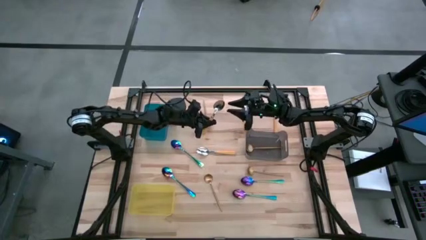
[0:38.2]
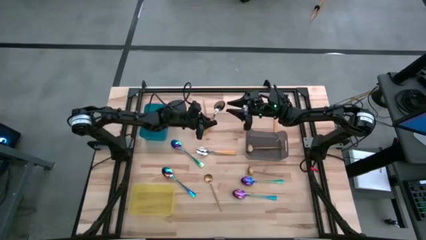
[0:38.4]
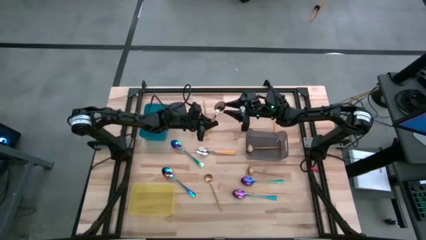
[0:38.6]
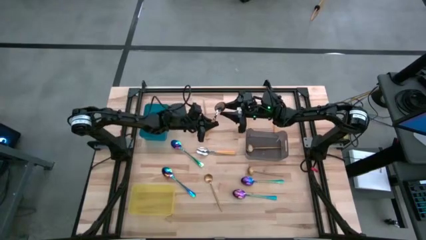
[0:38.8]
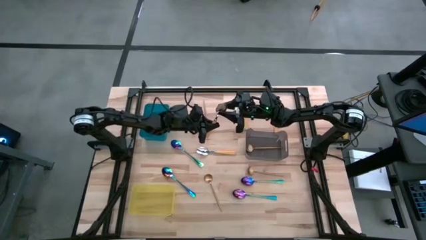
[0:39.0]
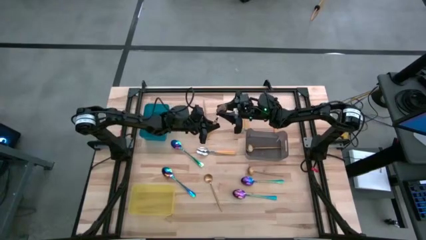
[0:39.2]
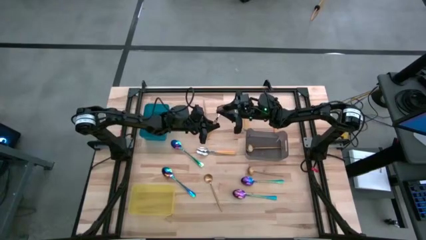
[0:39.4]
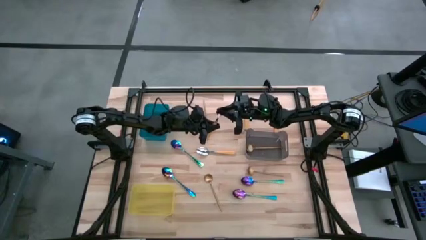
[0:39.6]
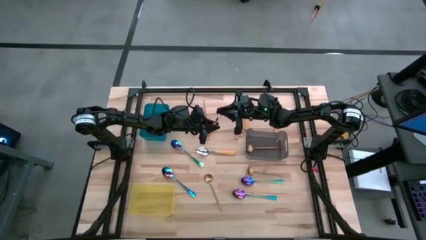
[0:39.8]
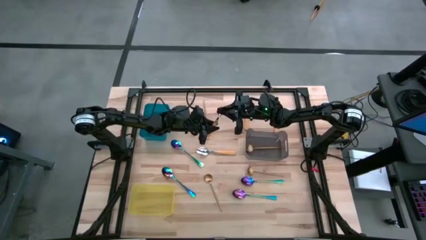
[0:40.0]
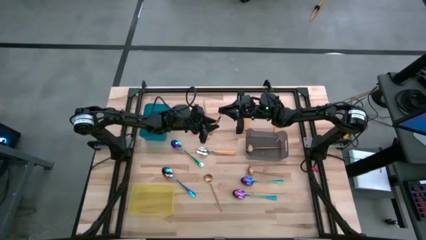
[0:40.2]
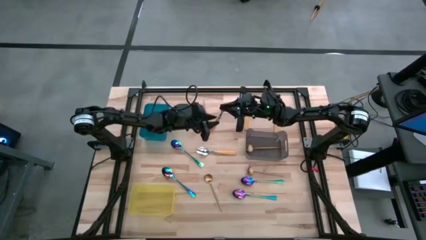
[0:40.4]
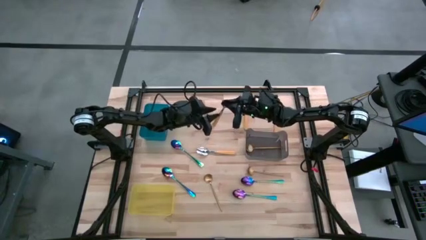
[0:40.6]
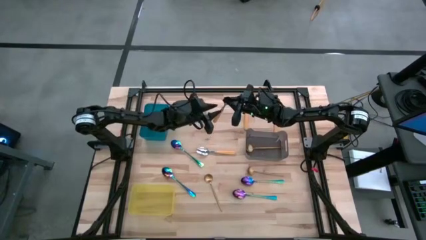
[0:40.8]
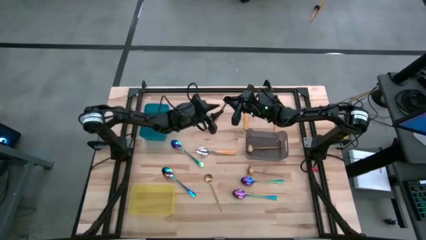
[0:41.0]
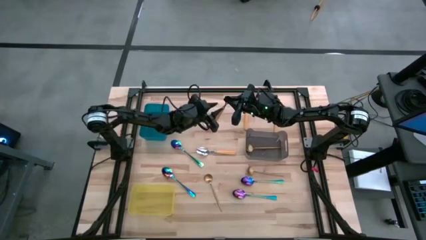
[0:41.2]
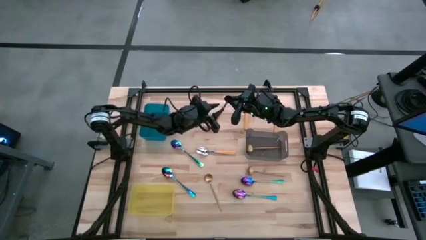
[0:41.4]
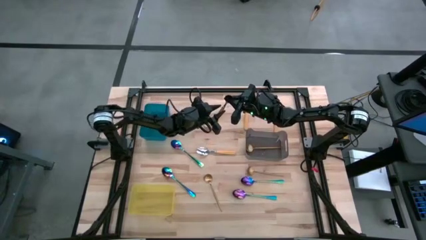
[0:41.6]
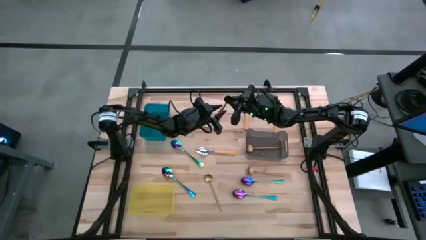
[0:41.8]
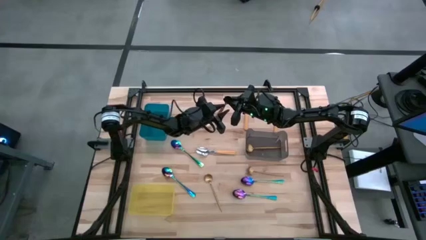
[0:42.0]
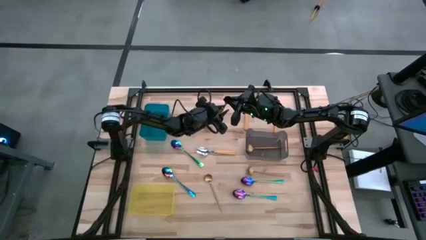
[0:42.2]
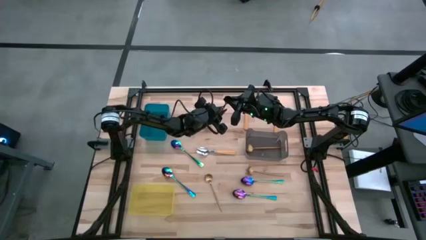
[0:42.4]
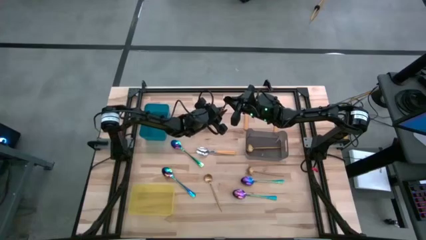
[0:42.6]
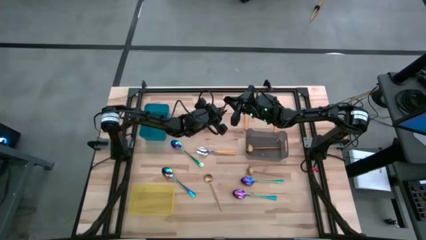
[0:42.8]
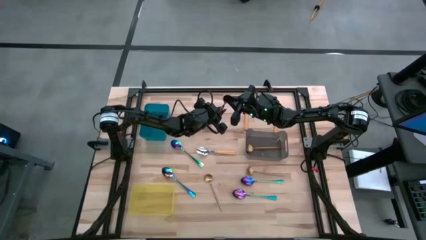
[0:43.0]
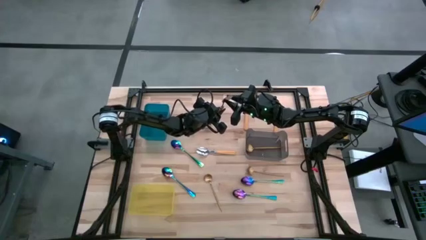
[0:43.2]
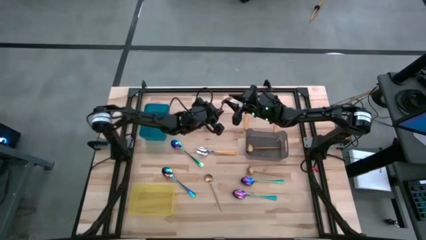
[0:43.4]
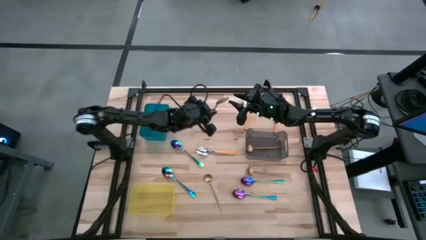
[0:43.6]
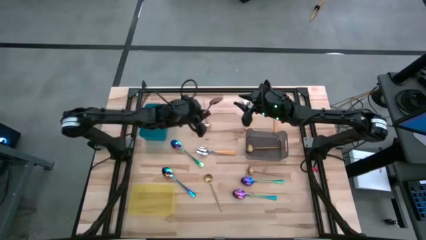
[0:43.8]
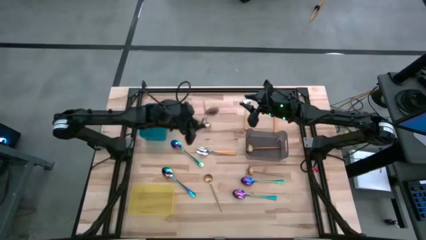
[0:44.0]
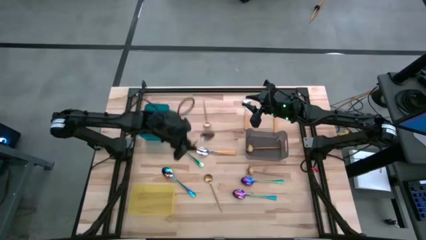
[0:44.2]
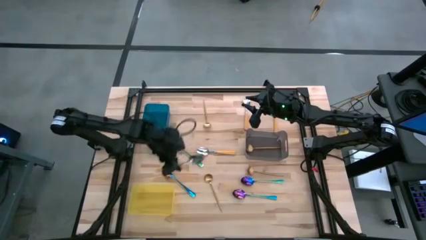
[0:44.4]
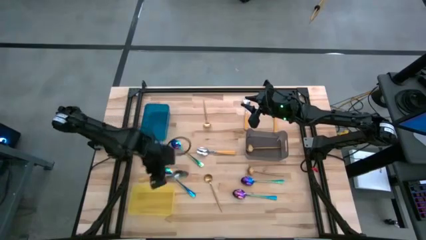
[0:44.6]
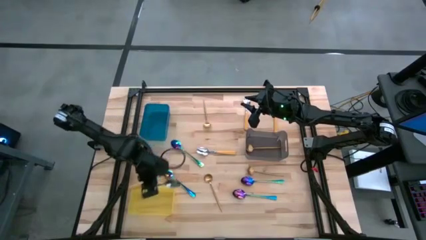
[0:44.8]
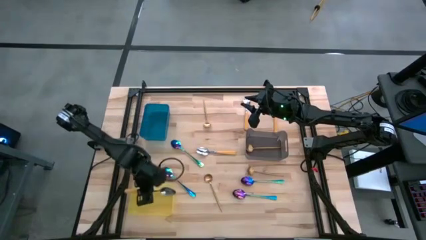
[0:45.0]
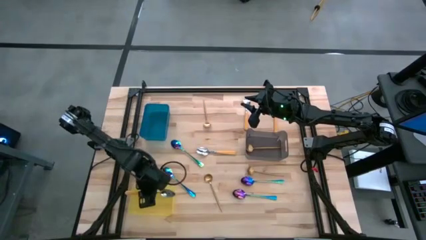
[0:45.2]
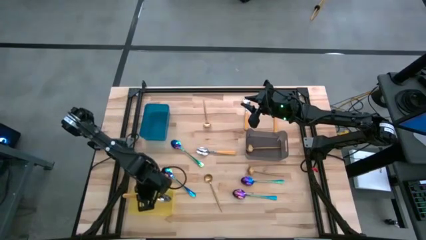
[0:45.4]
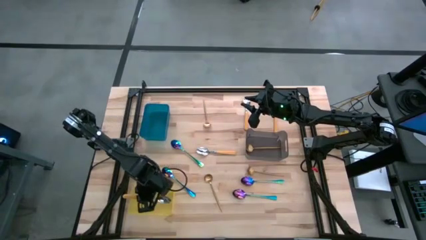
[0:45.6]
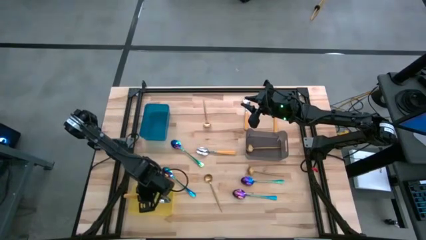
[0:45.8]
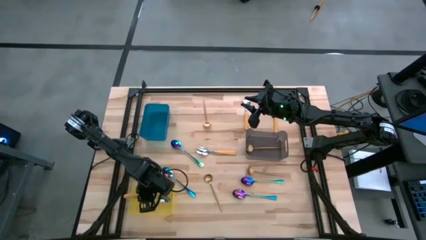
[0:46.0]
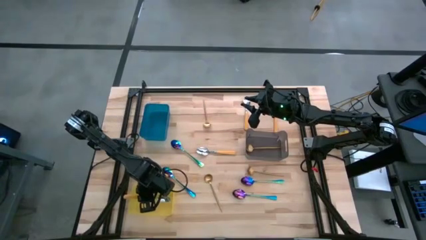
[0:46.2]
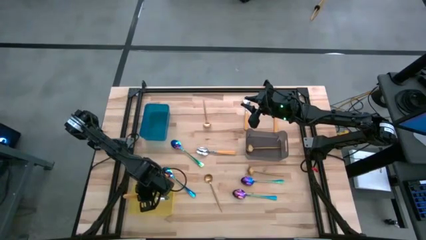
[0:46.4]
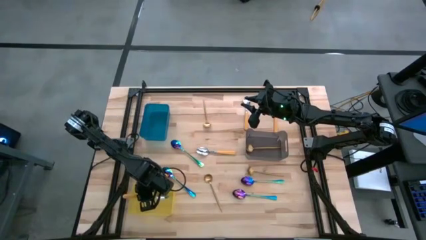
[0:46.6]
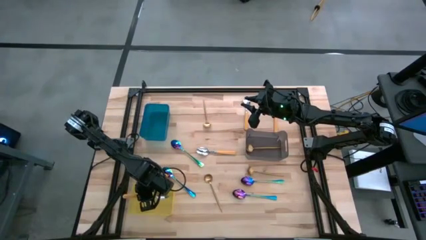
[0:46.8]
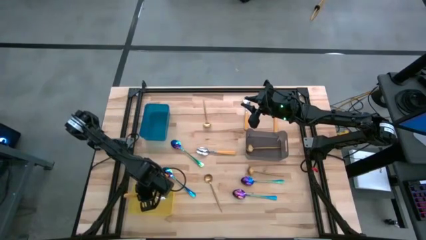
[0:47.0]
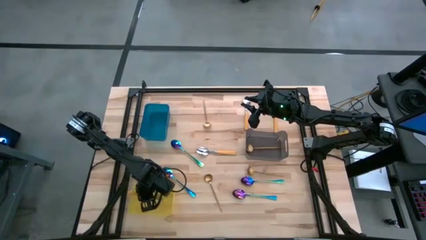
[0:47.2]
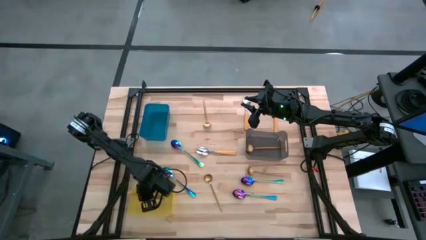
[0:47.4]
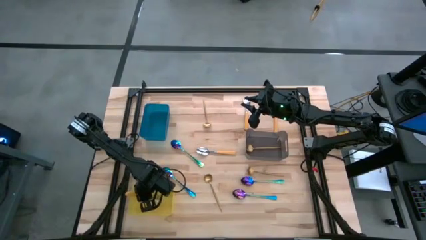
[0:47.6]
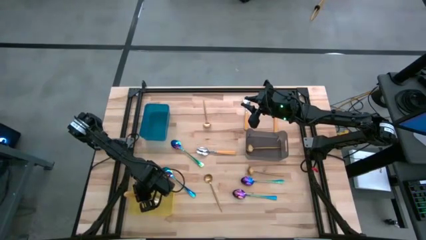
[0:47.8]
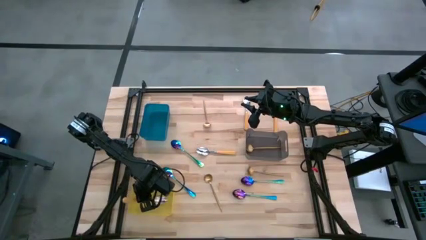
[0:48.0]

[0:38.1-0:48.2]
Task: Sort silverware by color (type)
Put the yellow spoon into the yellow bin

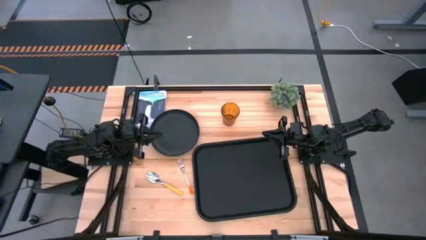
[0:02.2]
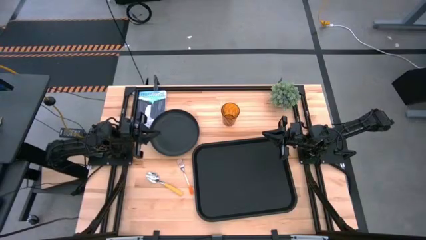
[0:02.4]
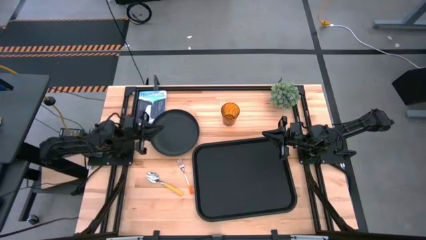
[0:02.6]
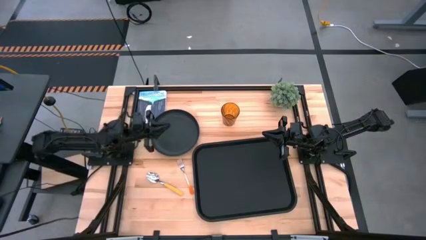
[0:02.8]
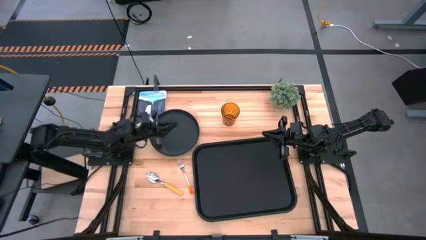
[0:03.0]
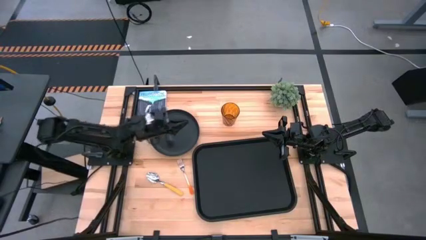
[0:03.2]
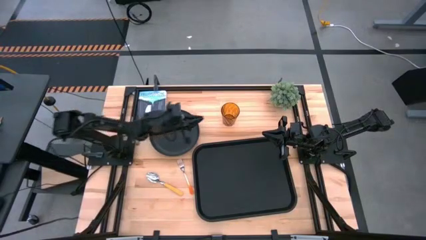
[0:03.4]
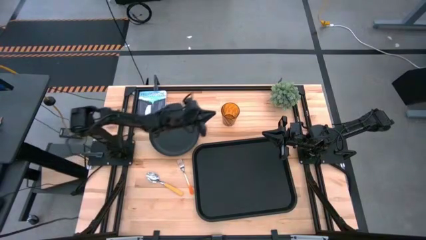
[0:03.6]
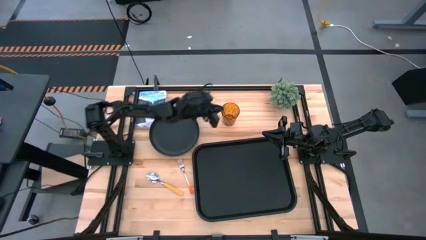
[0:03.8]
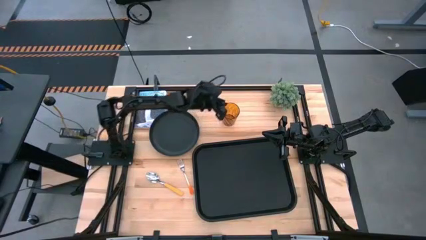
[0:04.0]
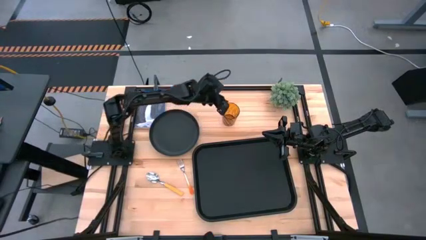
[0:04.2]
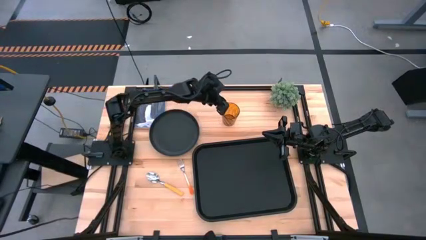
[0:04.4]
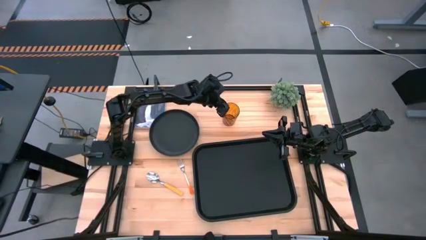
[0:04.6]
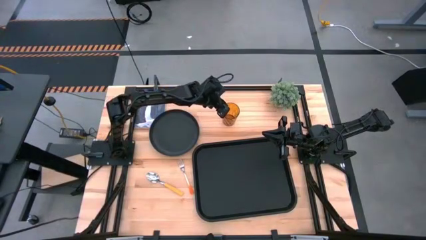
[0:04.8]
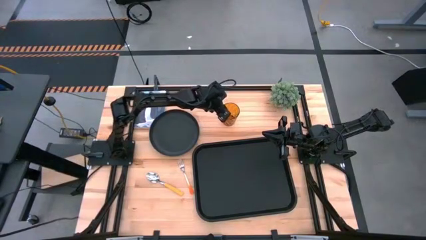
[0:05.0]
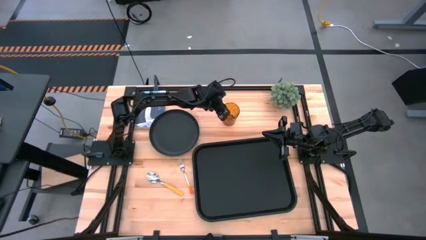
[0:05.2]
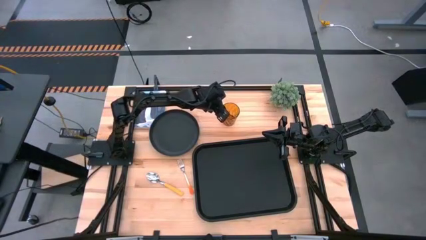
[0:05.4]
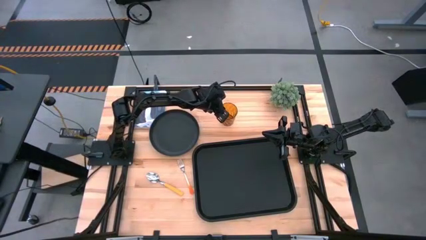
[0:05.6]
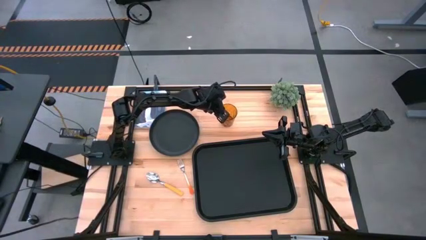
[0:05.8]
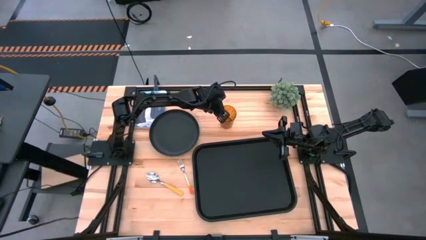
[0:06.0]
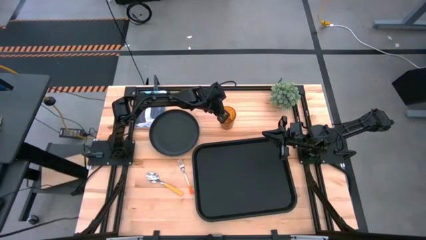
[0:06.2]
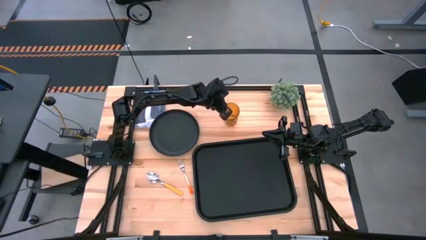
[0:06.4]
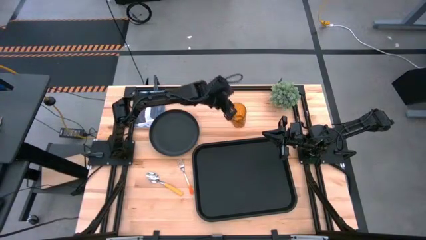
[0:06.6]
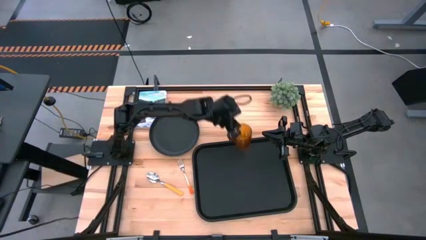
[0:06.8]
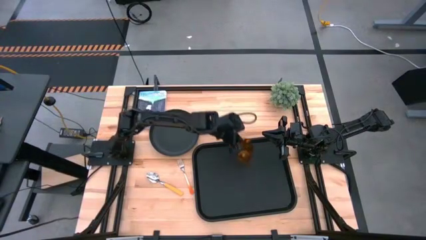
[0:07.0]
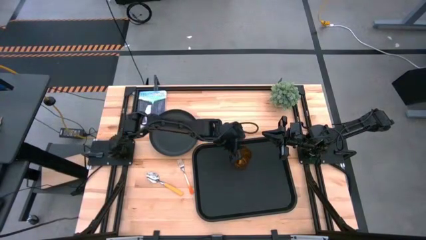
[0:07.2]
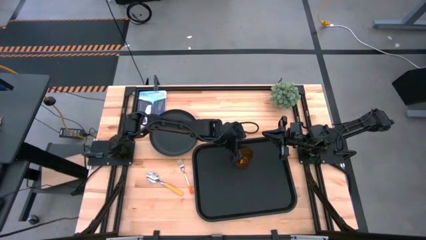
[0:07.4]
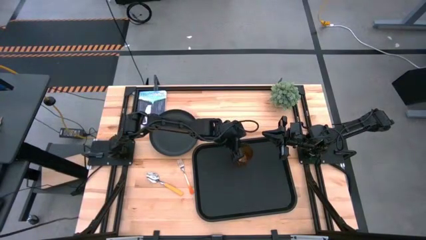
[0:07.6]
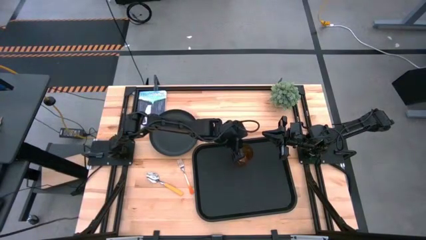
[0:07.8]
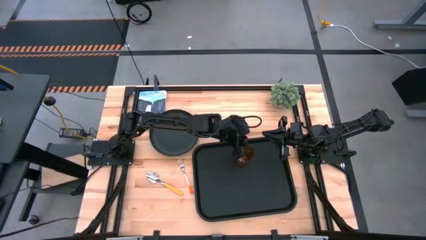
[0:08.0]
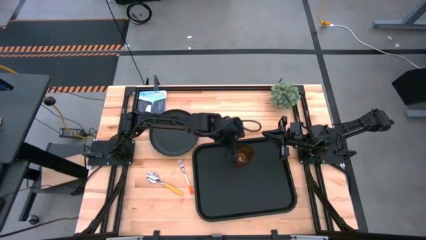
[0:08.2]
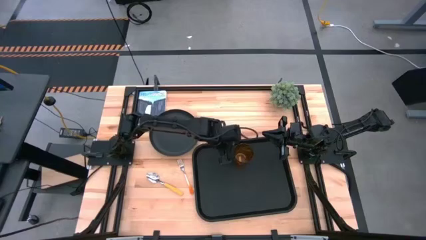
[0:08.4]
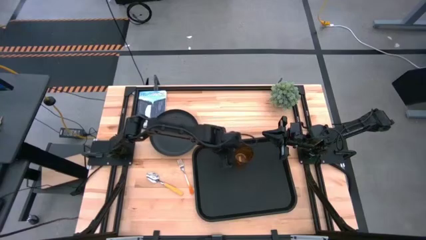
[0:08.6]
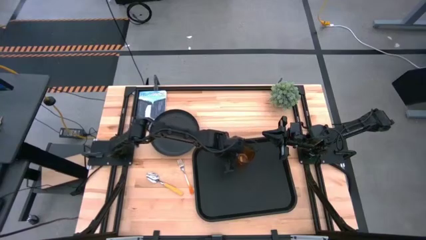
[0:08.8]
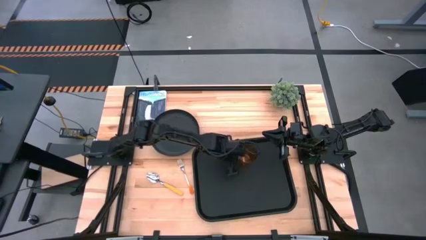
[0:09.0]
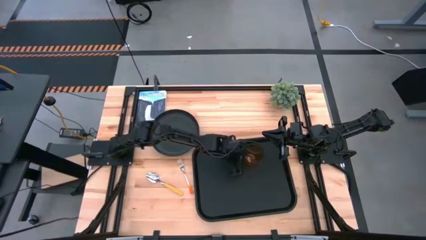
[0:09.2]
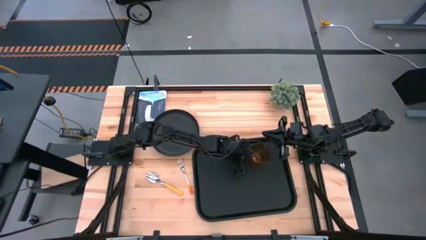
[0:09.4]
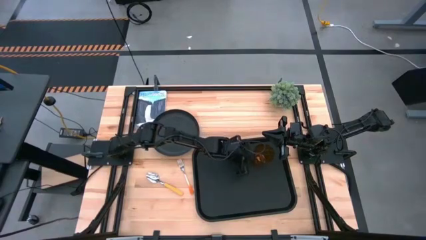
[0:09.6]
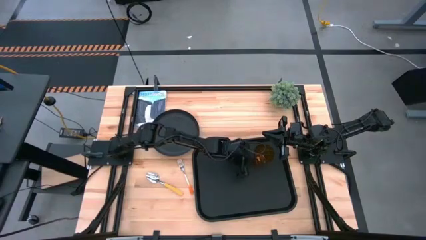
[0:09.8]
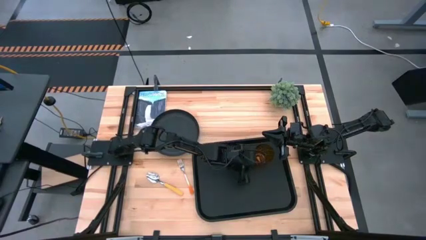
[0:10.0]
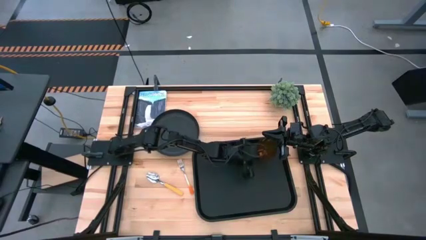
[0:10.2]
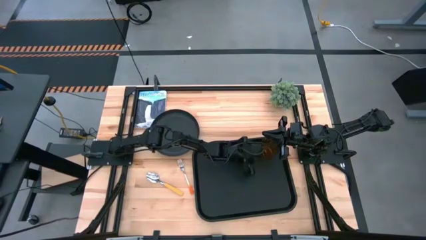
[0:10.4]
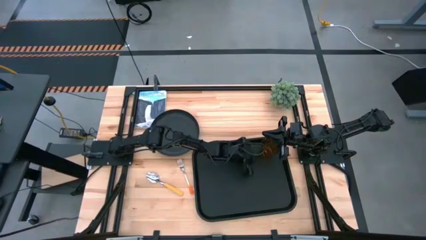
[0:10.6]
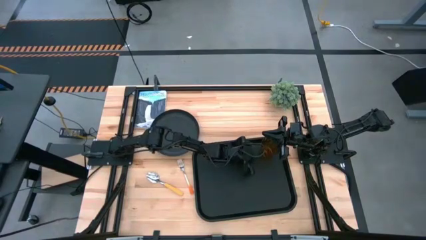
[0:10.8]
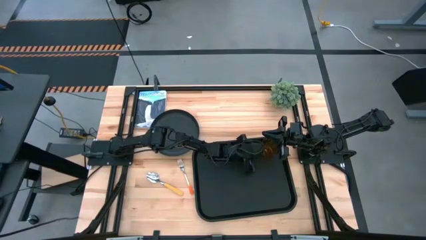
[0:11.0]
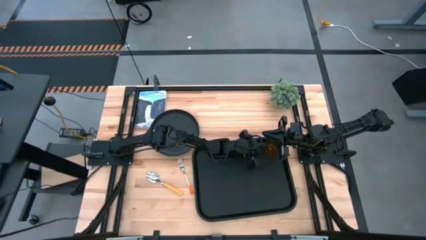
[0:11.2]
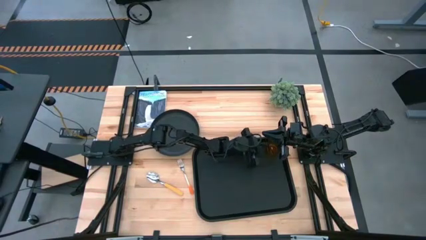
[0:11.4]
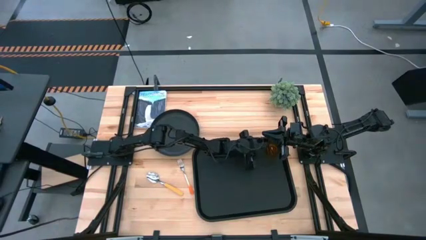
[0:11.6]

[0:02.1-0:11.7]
Task: Pick and place plate/cup/fork/spoon on tray
Put the brown cup on the black serving tray
